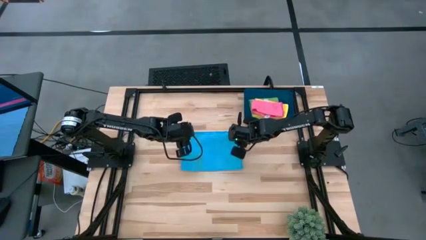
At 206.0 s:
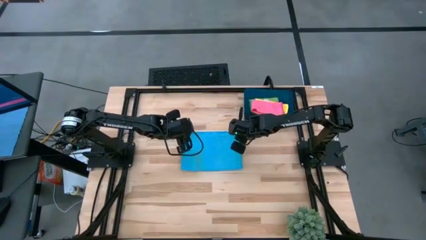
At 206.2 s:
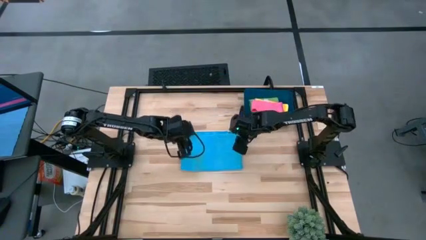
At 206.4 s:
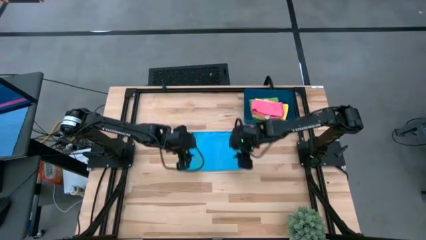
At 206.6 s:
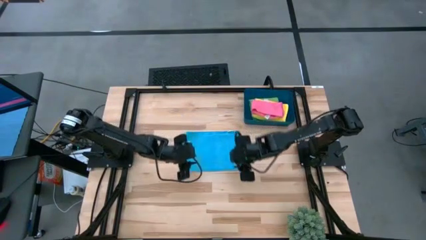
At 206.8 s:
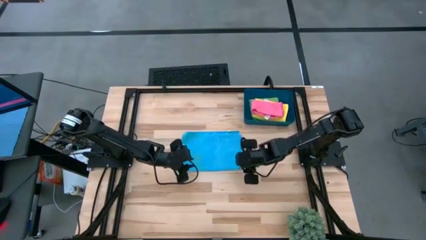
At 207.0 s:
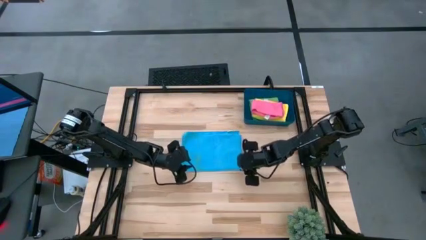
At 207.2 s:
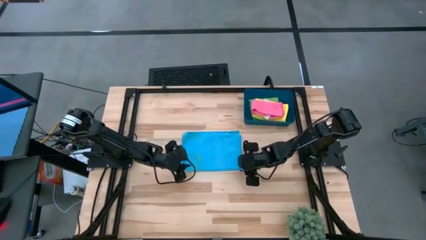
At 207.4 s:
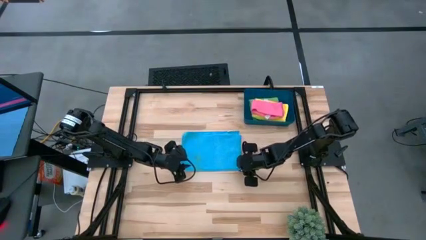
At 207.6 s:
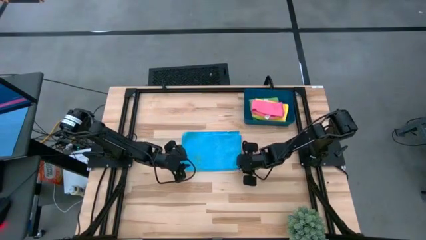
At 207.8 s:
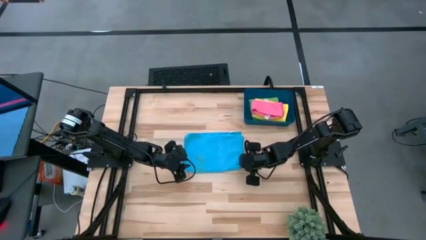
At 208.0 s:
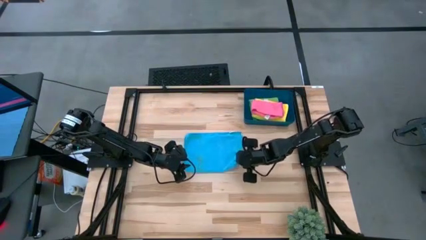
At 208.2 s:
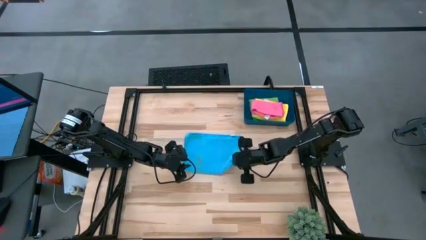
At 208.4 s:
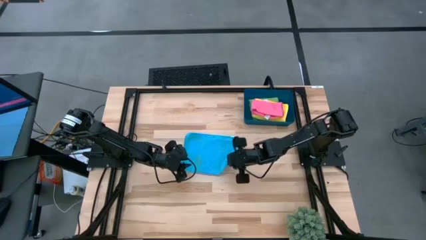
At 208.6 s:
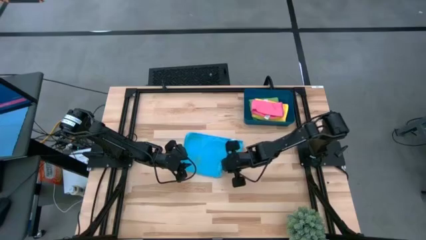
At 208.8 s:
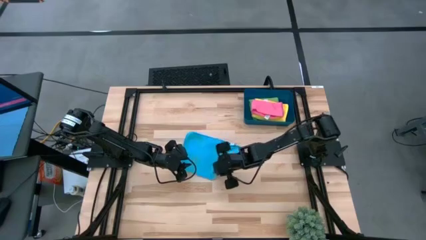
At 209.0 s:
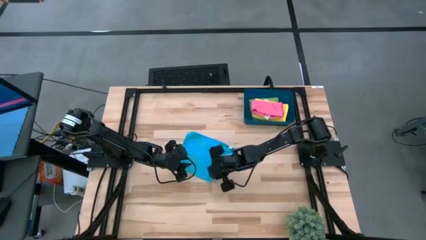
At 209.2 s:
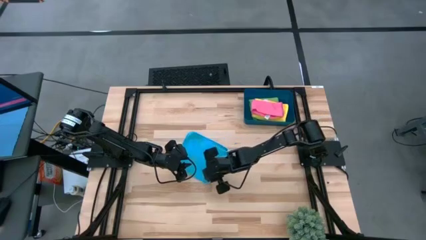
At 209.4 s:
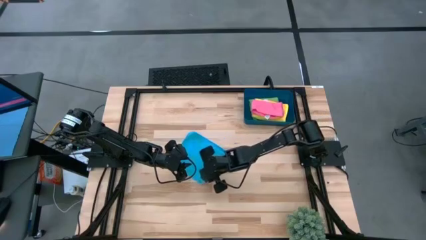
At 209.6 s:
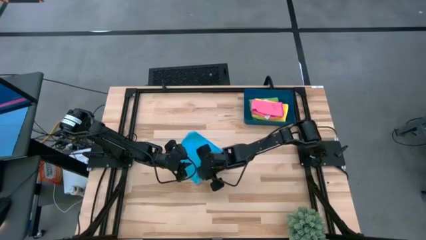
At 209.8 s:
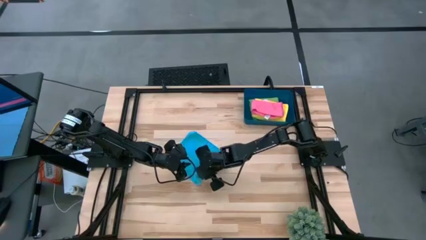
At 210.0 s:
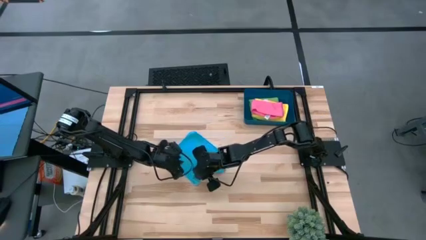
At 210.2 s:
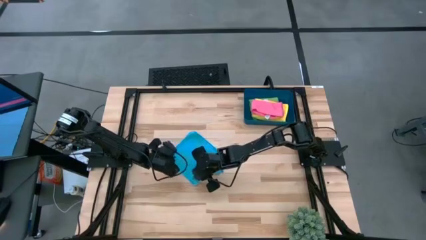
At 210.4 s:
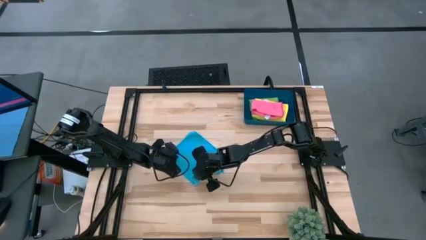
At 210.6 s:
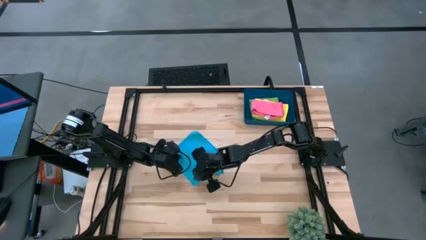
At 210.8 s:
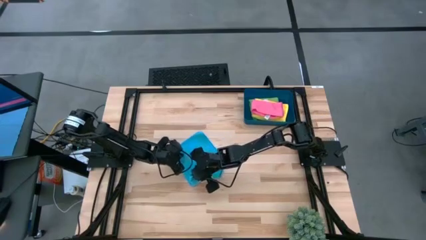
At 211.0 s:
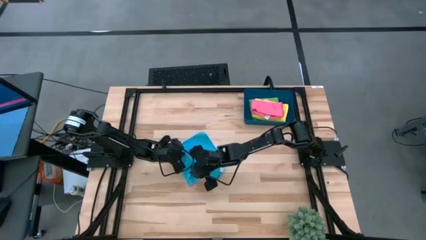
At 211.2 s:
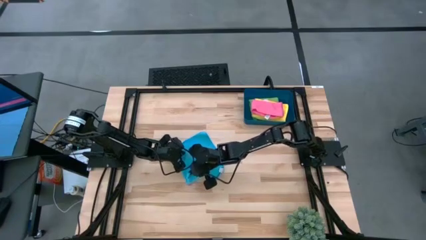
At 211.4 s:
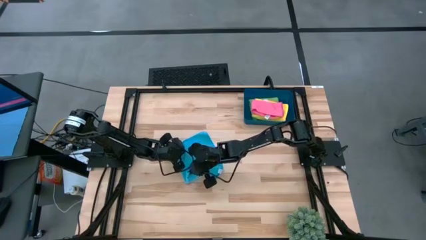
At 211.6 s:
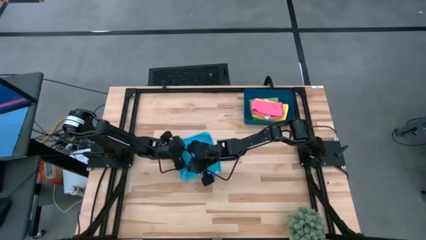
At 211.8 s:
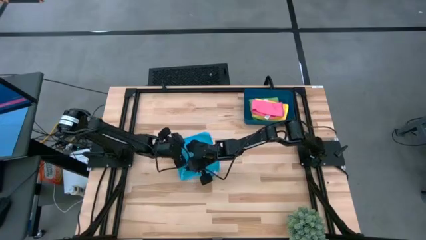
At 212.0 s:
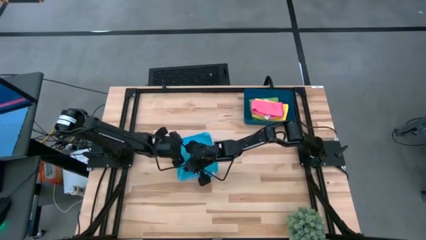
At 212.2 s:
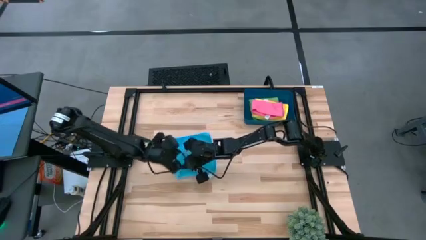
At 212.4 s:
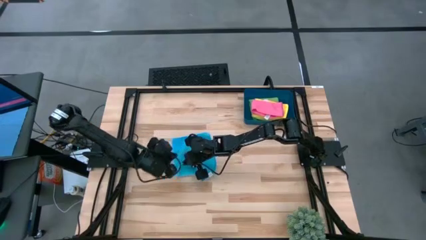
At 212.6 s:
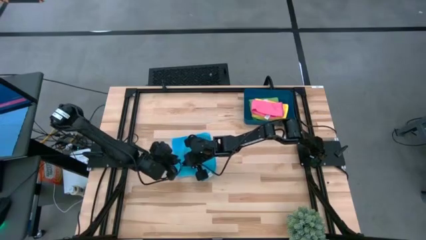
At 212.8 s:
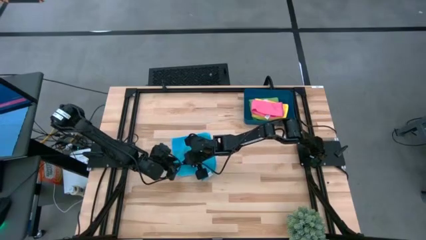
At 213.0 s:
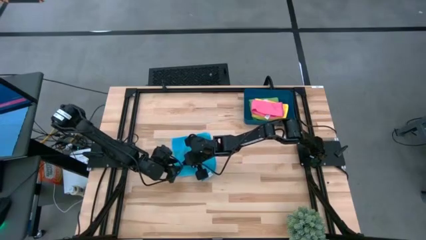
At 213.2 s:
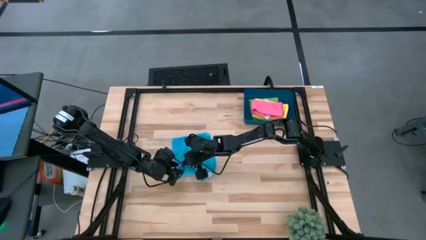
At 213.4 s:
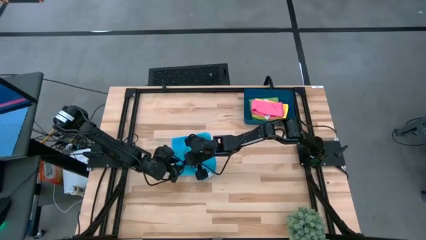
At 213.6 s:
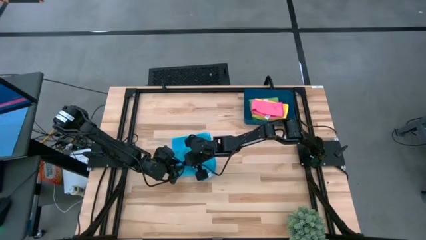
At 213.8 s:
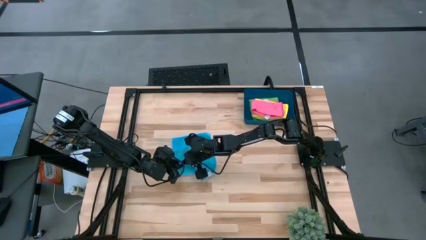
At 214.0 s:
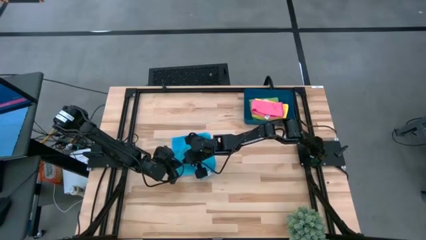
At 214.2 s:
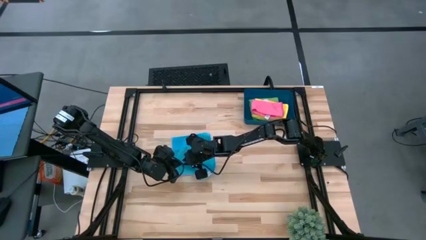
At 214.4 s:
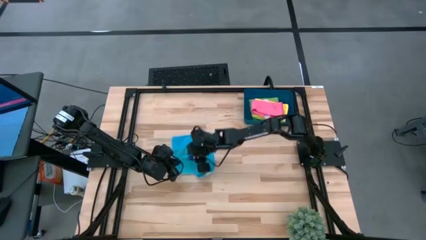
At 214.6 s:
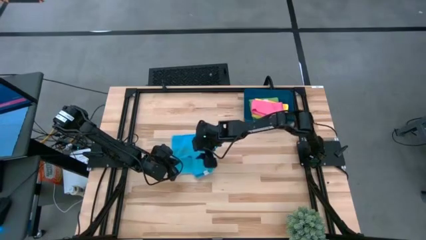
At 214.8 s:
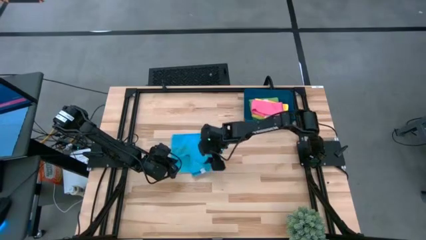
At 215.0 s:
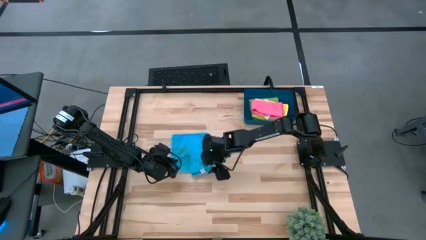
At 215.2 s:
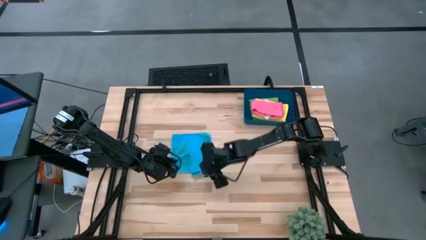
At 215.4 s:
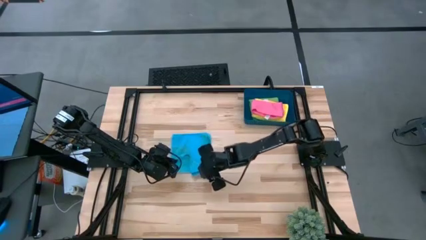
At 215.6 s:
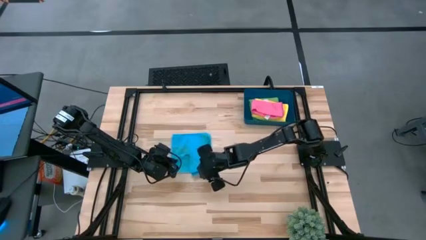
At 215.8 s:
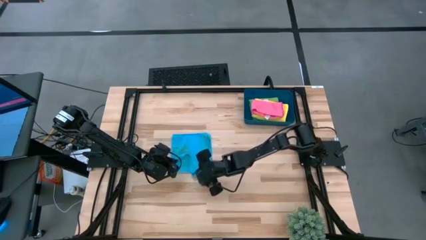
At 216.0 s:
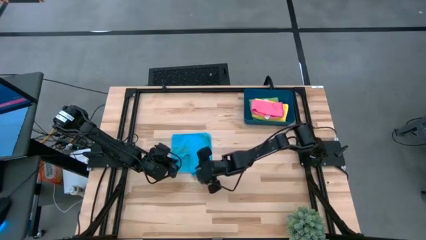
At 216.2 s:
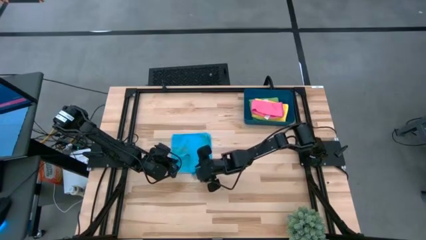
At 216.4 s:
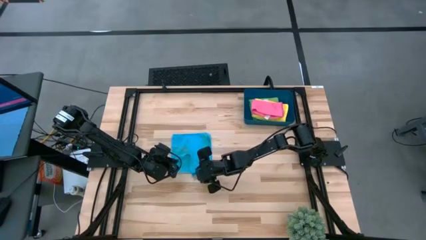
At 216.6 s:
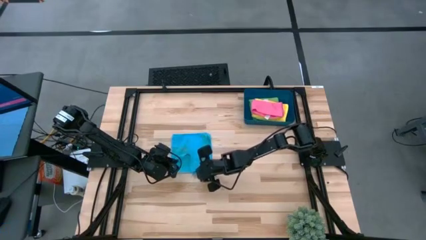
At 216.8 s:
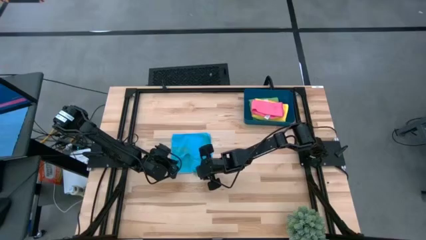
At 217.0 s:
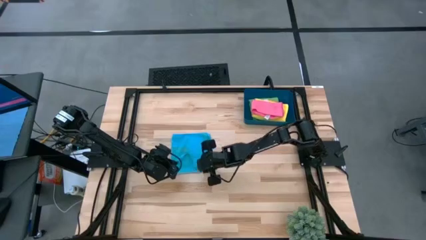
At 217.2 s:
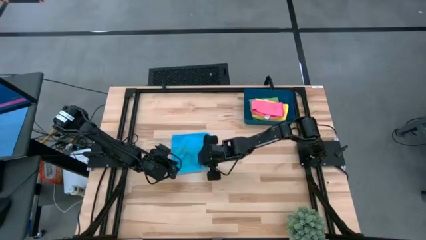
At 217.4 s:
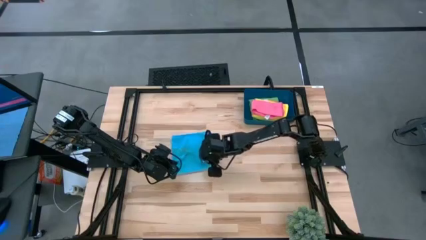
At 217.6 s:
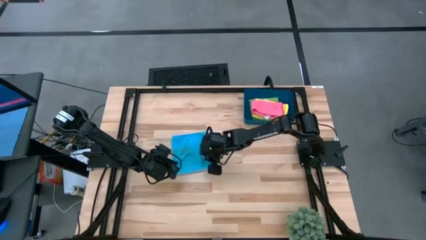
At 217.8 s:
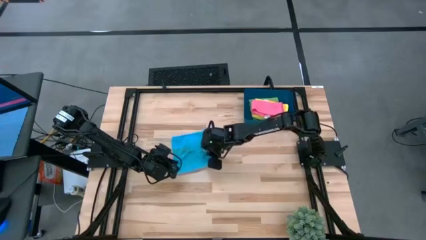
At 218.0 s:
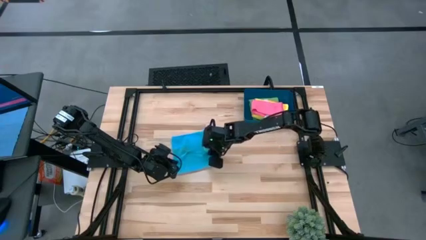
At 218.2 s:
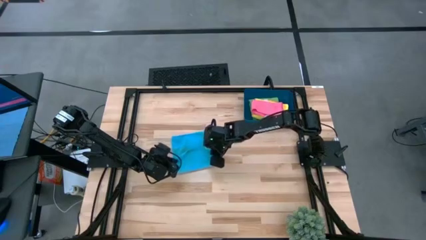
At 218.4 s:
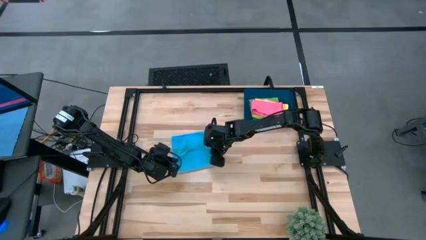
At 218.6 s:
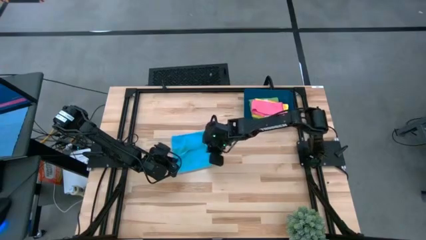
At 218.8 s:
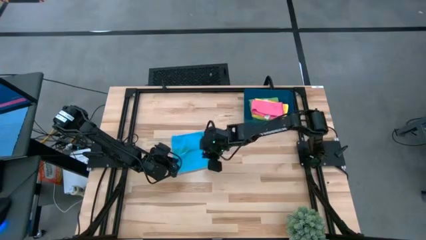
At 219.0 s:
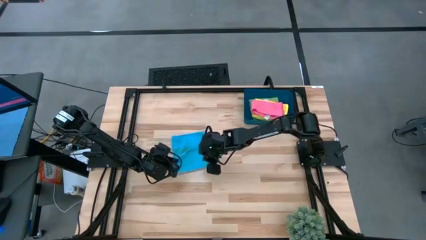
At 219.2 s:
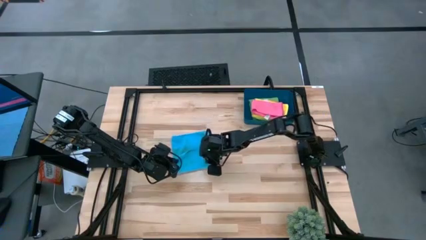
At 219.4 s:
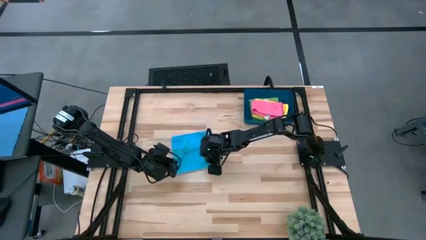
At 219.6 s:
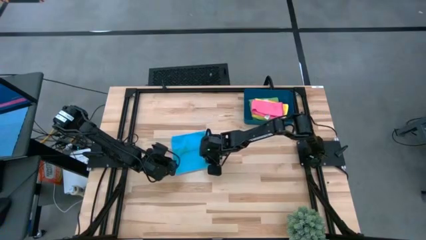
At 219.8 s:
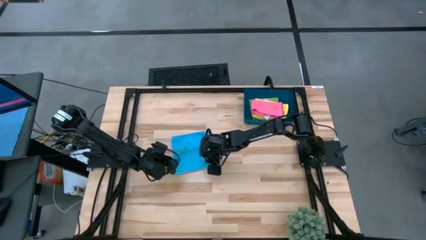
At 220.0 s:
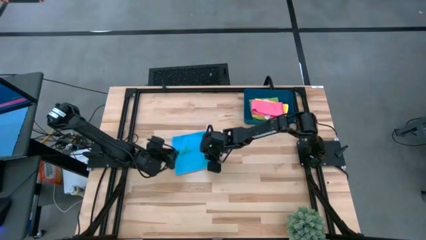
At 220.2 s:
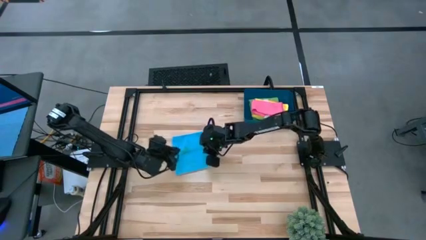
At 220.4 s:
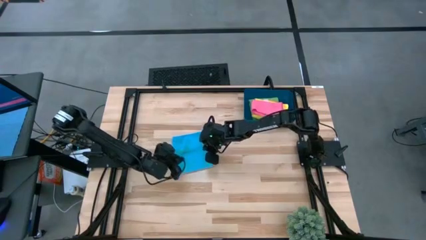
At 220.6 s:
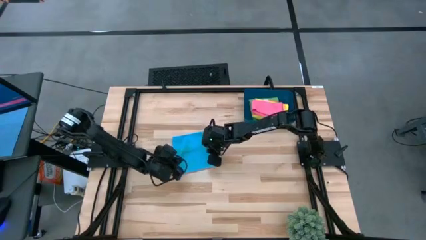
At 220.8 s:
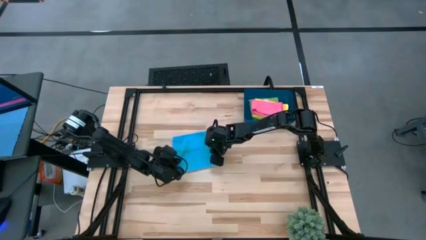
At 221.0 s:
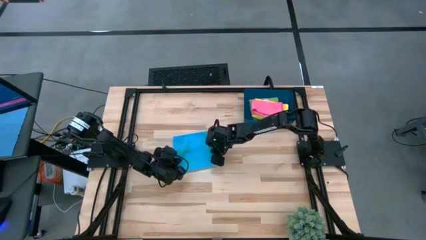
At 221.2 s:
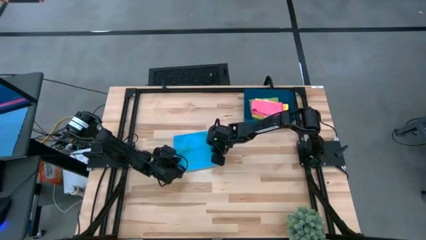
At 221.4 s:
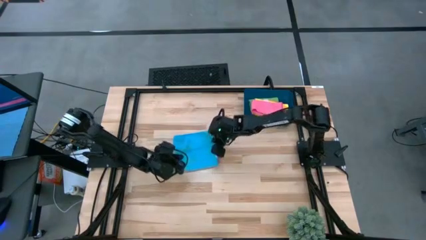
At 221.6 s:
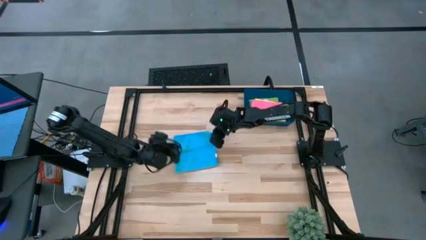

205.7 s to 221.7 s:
Task: Fold microfiber towels
Fold the light blue microfiber towel
